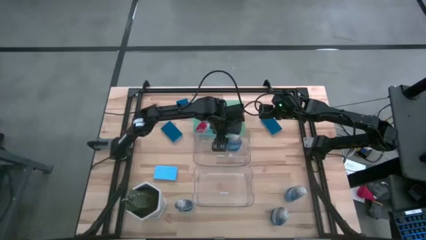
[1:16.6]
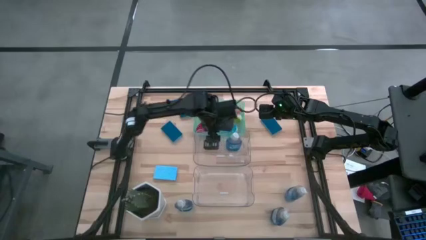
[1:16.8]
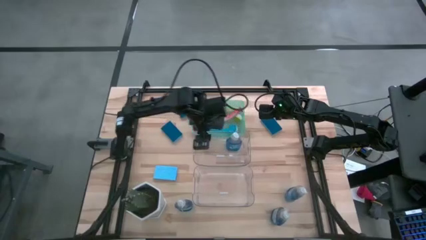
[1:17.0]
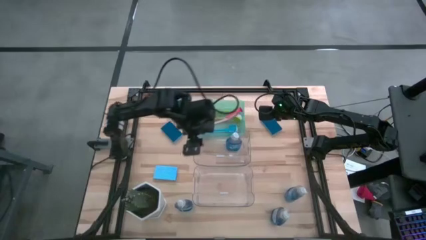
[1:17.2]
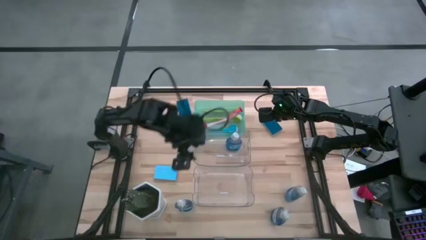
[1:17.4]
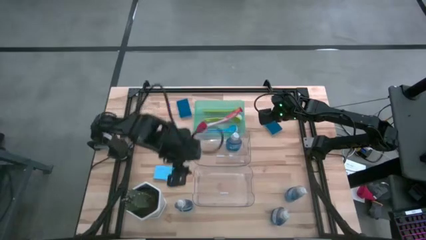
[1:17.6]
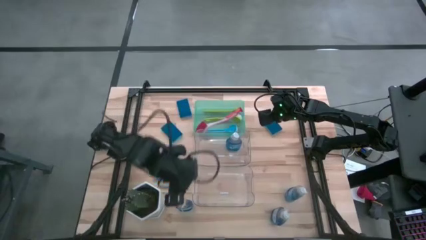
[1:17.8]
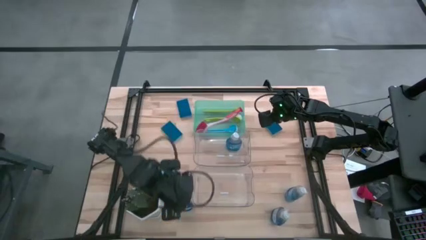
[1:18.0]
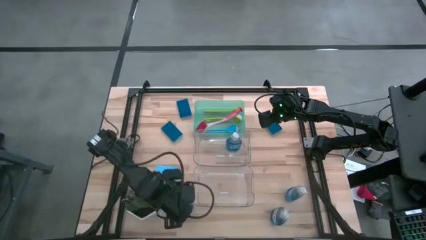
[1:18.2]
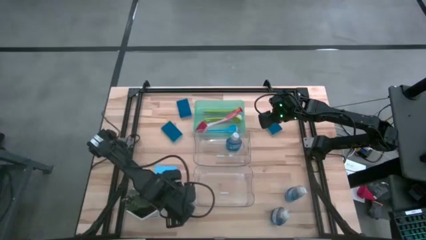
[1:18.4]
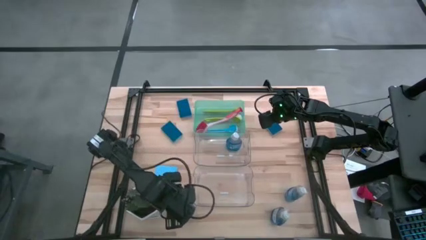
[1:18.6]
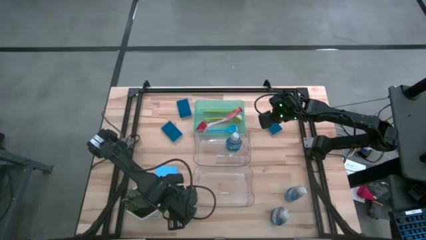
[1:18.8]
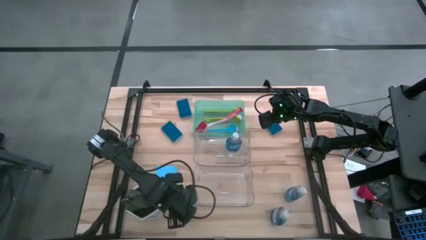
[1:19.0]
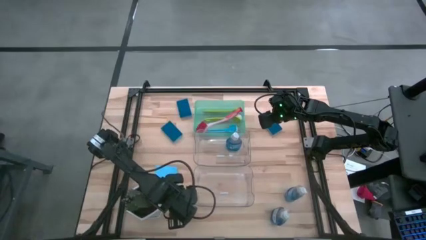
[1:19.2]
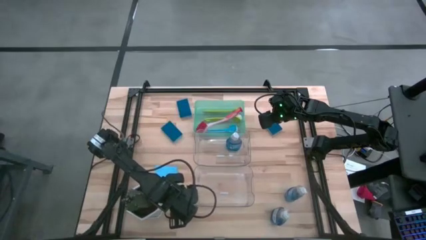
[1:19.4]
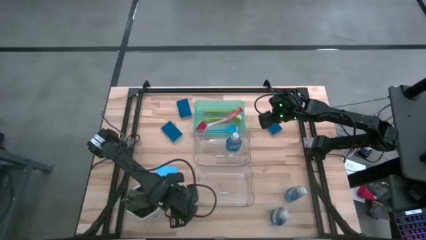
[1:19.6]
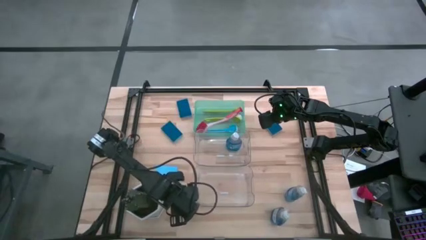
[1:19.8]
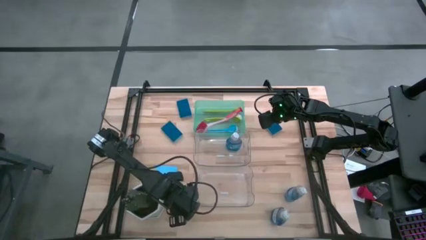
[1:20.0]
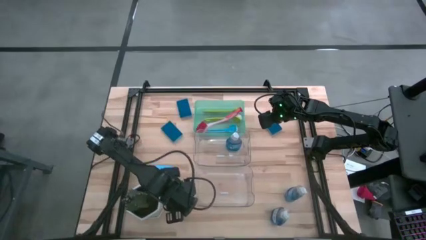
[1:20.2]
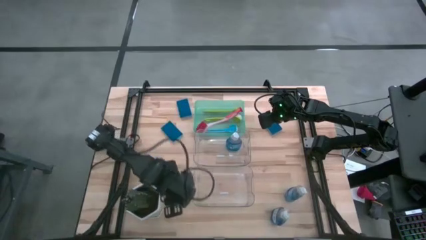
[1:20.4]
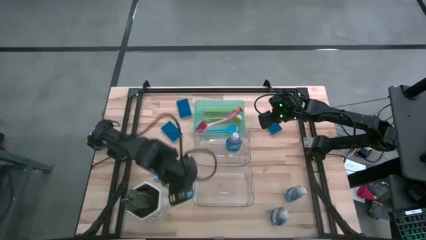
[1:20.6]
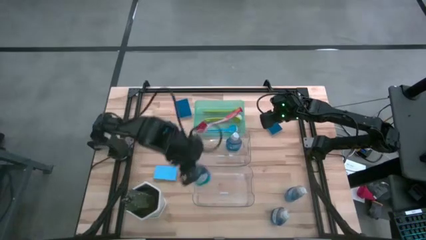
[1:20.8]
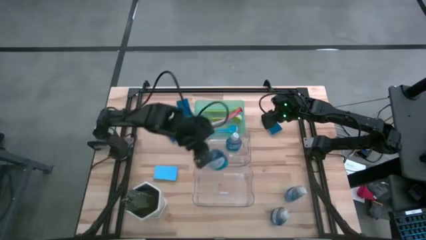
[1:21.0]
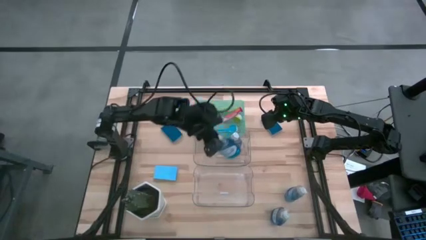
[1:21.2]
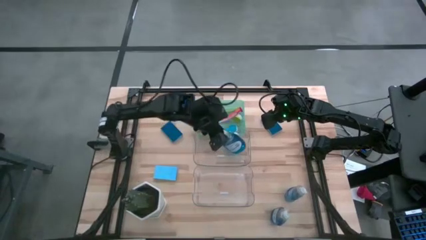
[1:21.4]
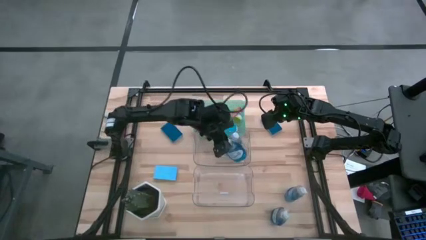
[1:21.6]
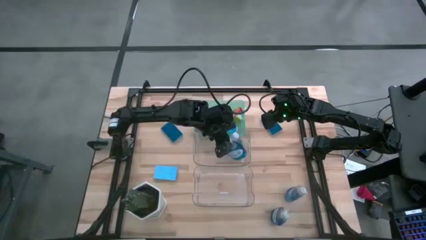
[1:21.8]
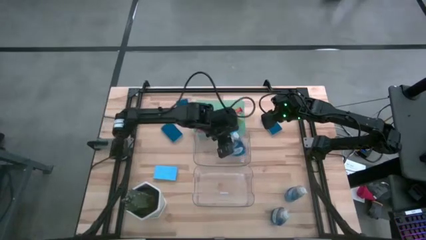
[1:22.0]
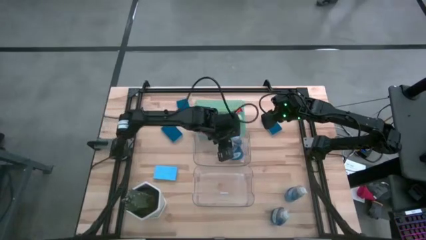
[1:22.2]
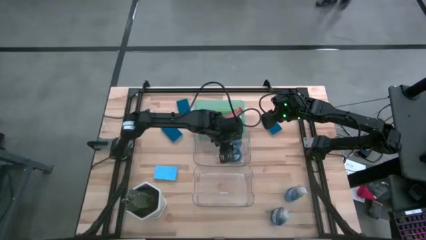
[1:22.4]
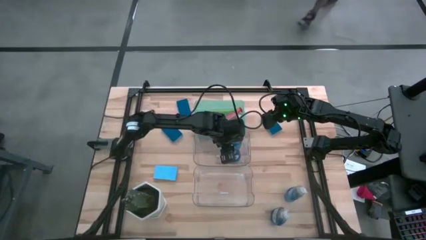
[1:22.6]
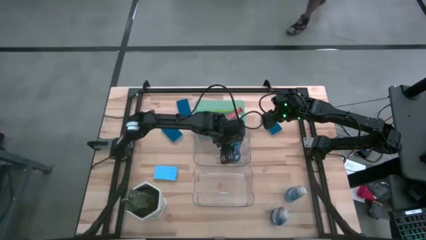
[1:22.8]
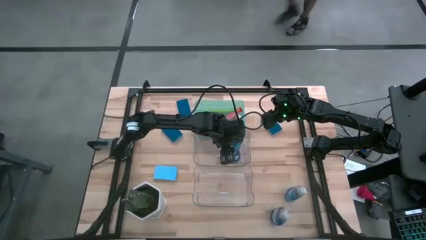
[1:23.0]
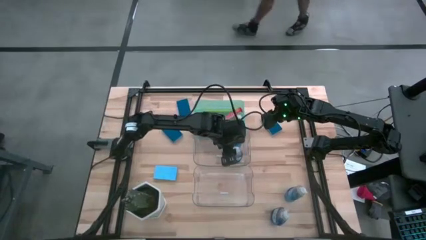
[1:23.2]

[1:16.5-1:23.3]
Task: Pick & Place Kitchen Sink Supplies
Put the blue dishwasher liquid into the top transparent bin

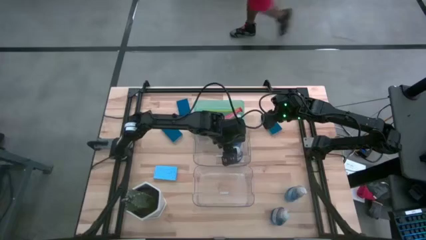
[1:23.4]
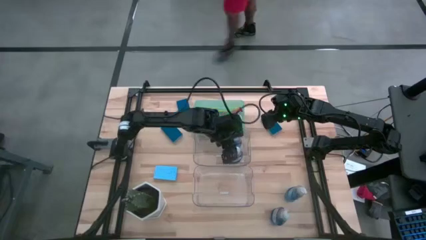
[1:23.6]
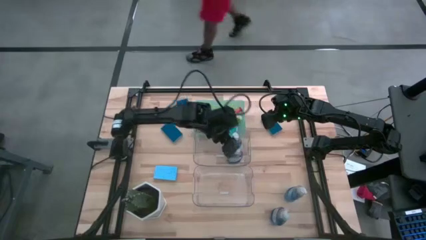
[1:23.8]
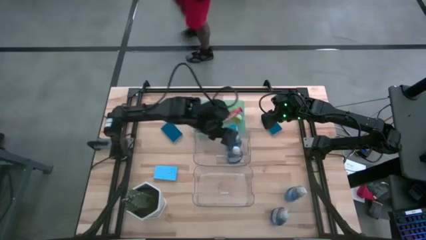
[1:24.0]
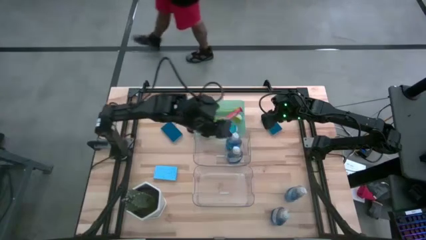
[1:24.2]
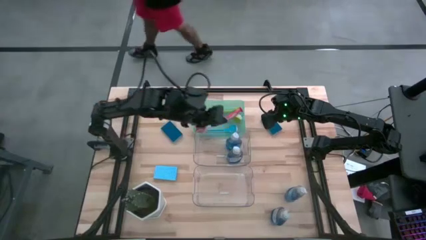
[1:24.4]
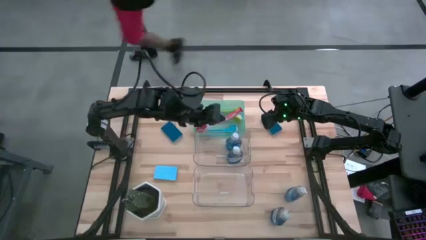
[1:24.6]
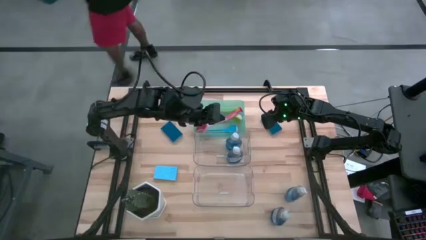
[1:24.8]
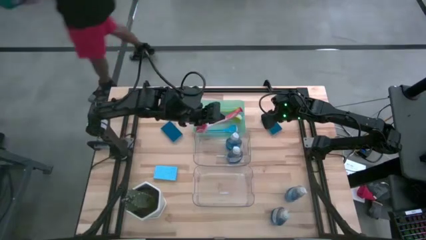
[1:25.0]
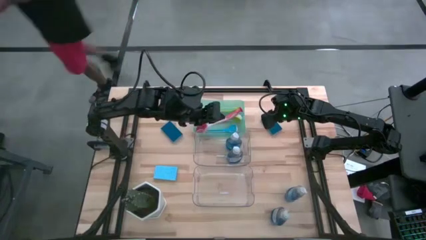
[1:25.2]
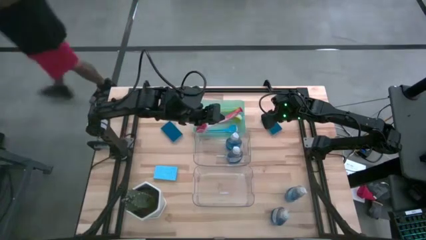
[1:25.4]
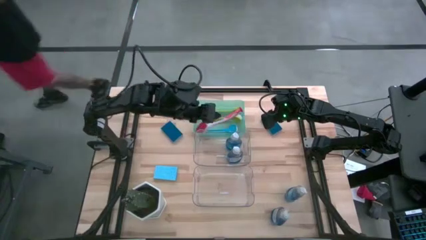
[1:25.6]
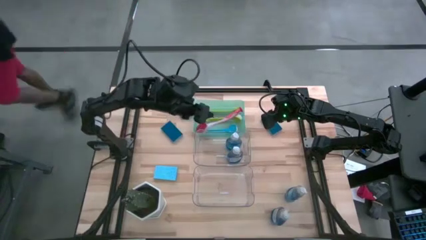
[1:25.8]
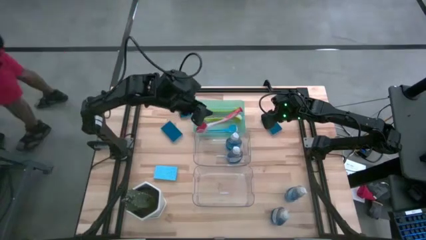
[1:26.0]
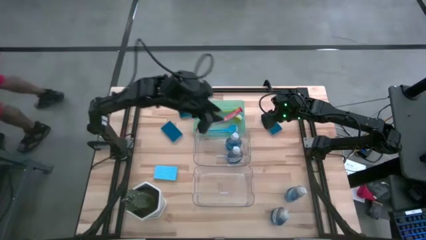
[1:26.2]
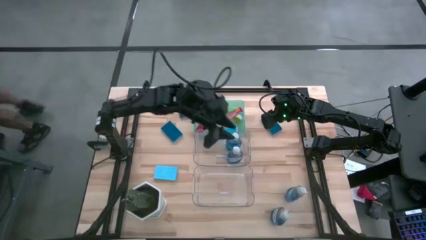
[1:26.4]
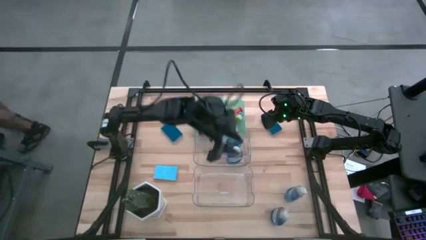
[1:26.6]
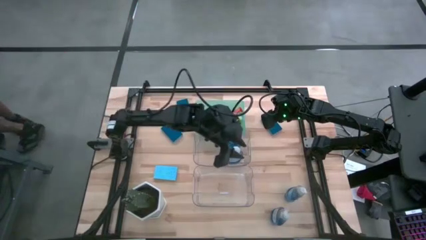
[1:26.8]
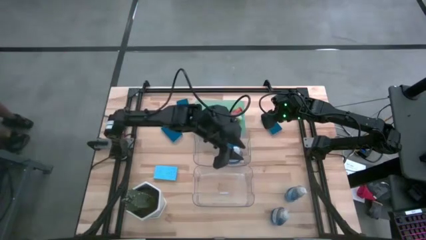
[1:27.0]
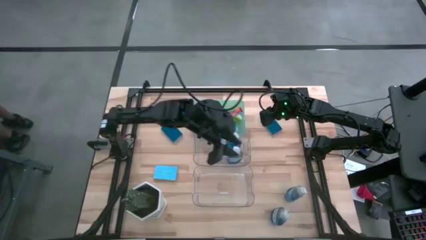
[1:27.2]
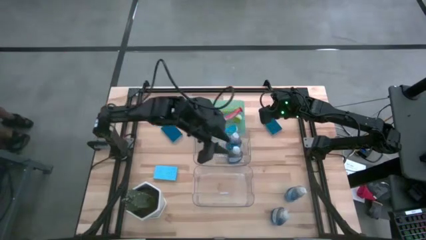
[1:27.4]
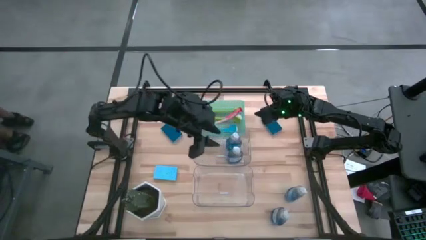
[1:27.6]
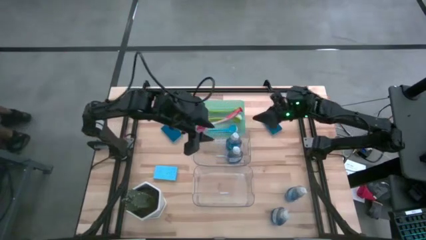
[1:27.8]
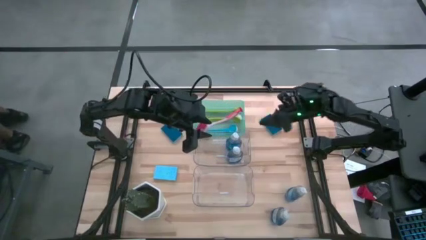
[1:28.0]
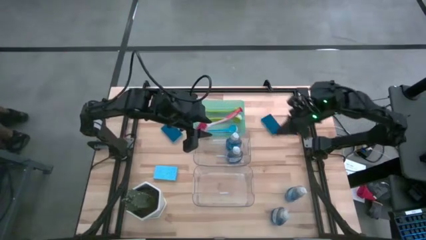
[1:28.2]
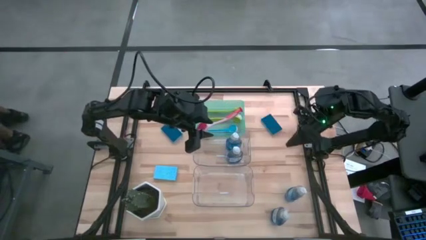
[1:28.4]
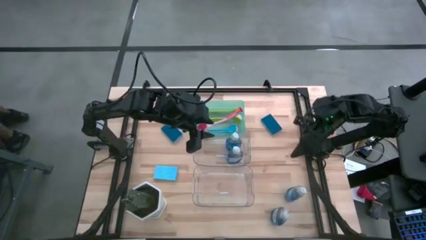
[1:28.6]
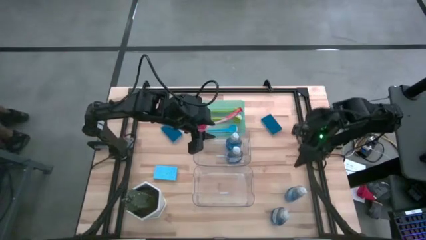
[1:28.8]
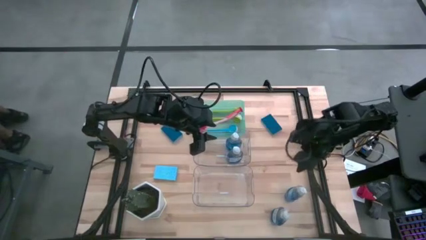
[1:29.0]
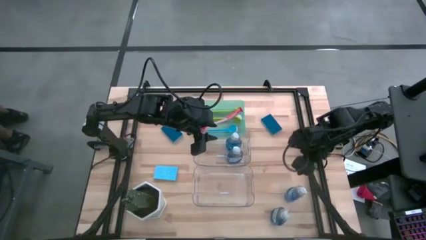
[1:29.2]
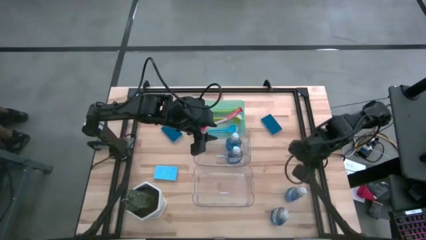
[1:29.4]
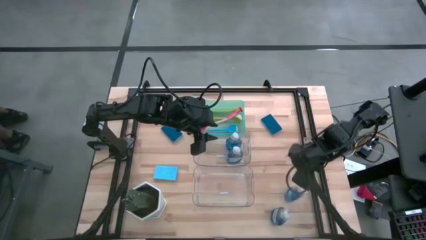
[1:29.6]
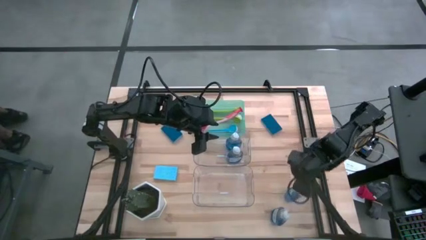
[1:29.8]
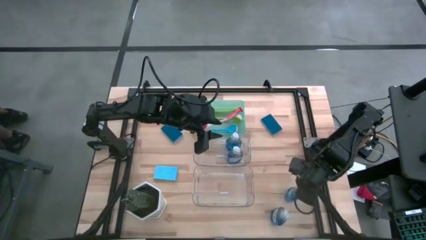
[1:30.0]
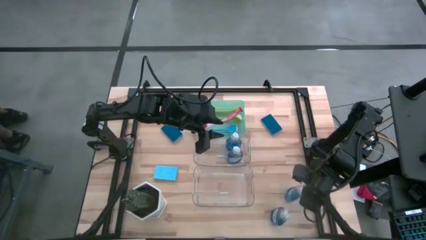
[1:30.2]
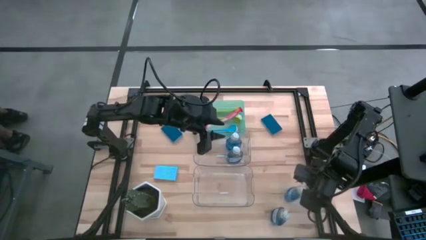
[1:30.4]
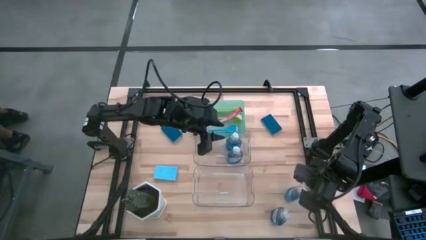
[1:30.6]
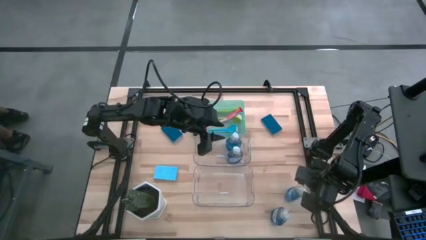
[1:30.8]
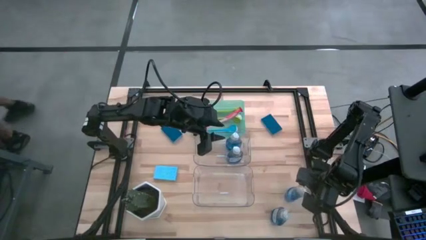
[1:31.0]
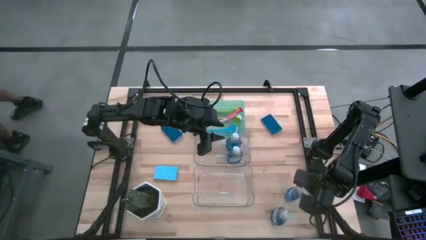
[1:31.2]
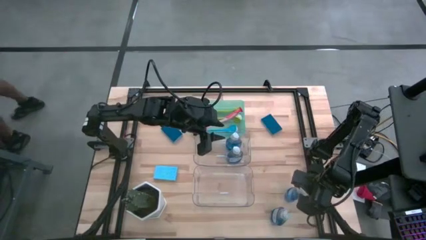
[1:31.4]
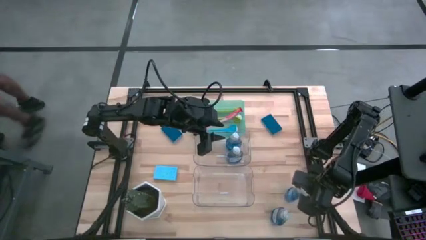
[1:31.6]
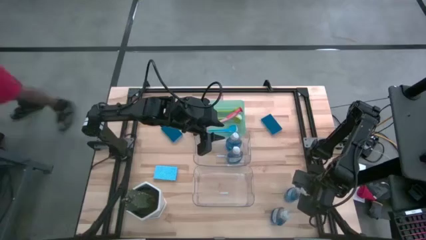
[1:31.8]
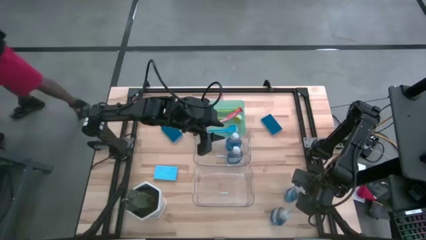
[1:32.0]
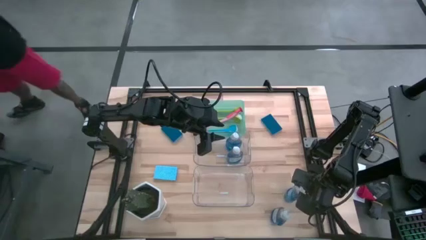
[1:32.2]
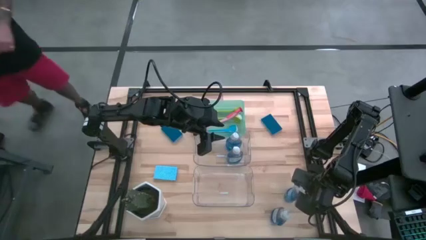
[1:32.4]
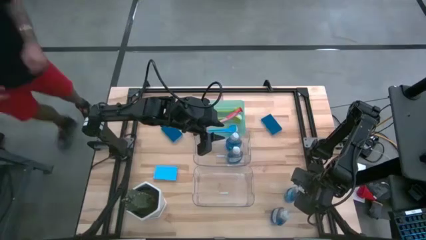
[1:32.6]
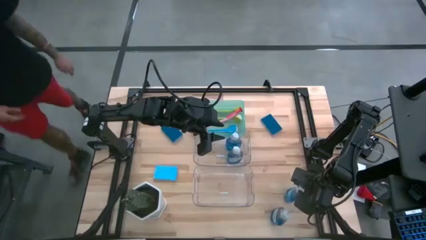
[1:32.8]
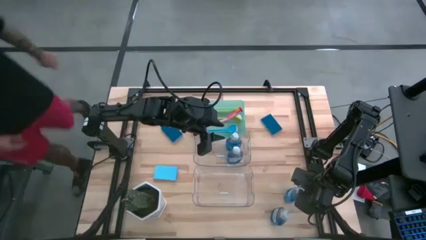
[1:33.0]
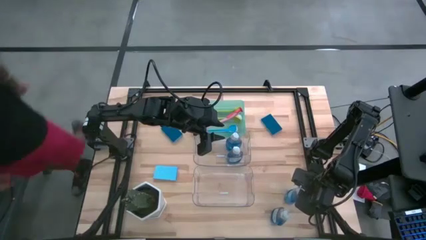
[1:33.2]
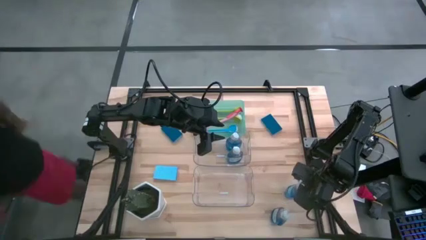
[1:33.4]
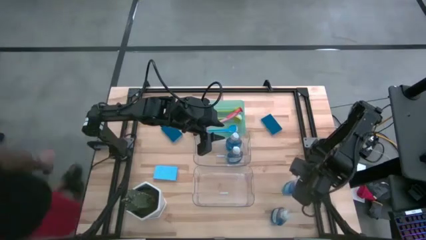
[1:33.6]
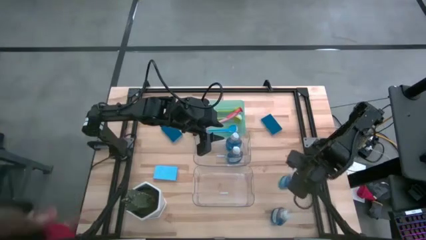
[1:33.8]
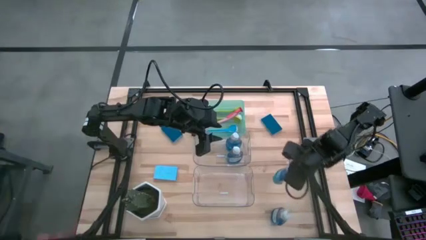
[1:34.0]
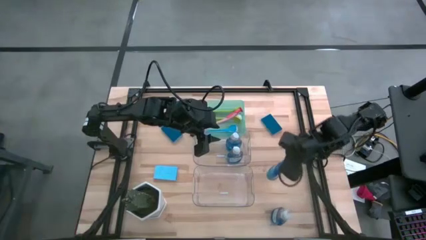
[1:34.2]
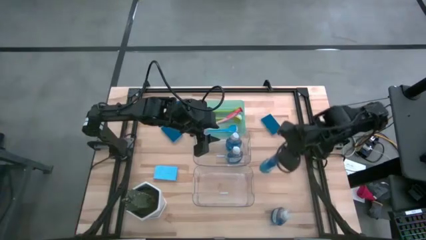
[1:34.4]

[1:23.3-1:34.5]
Put the blue dishwasher liquid into the top transparent bin
